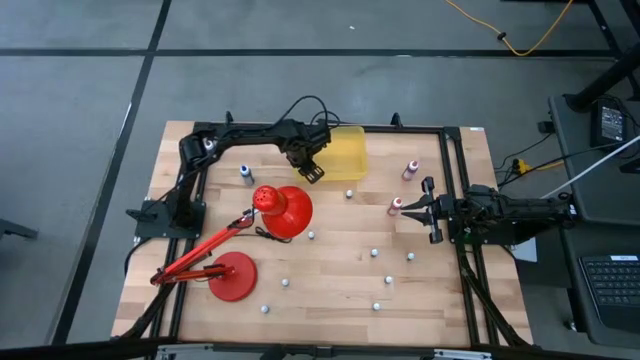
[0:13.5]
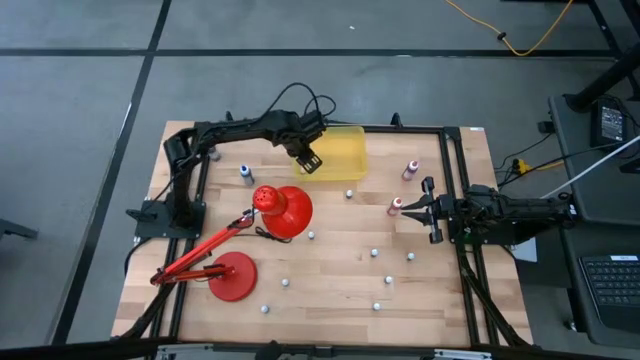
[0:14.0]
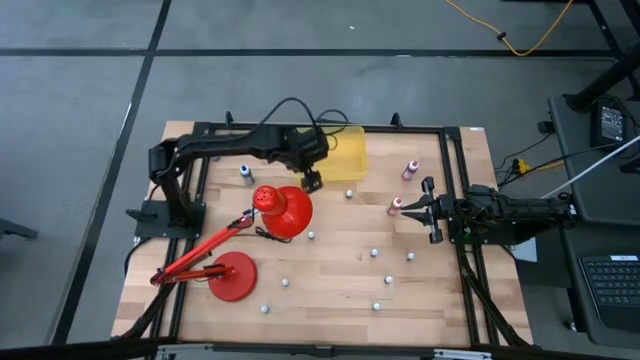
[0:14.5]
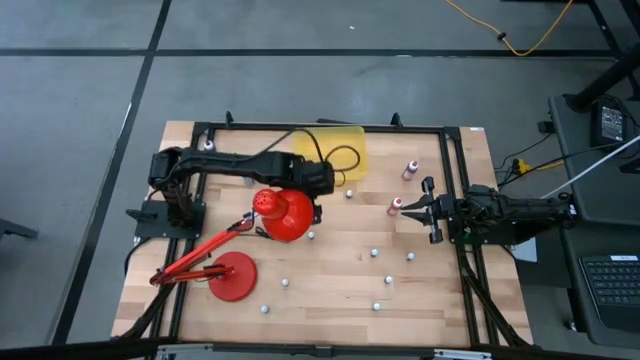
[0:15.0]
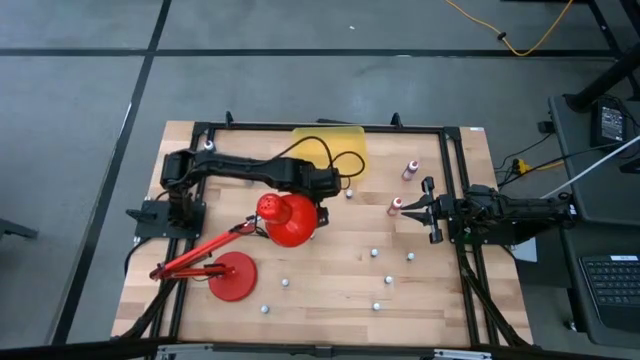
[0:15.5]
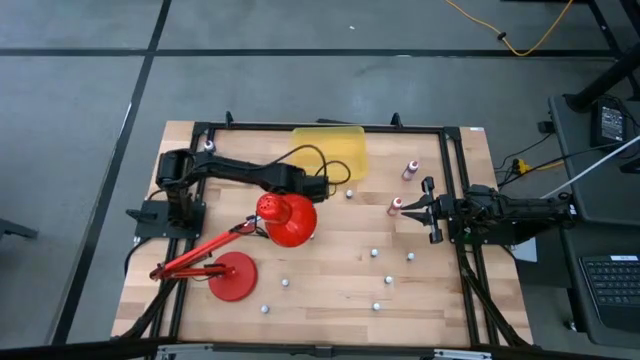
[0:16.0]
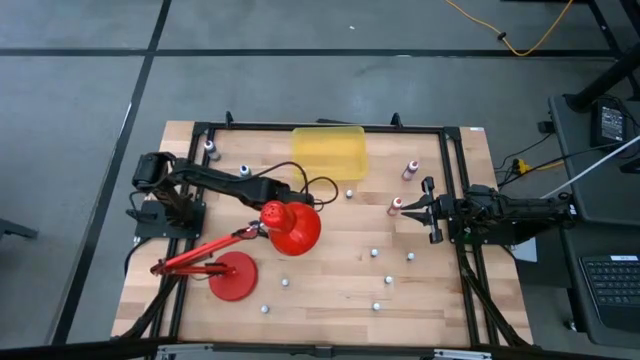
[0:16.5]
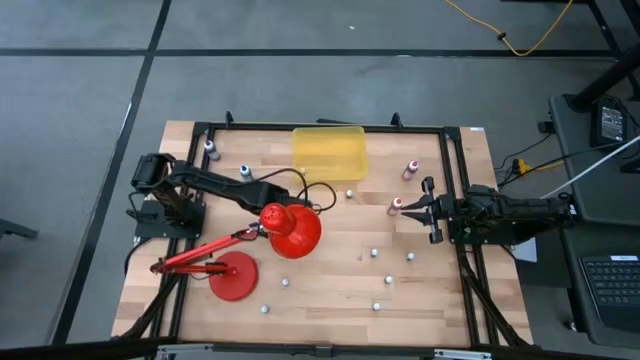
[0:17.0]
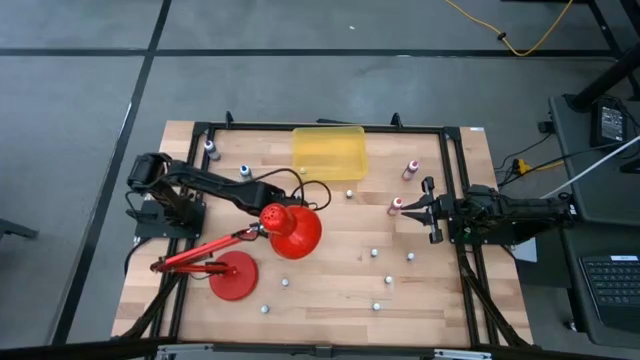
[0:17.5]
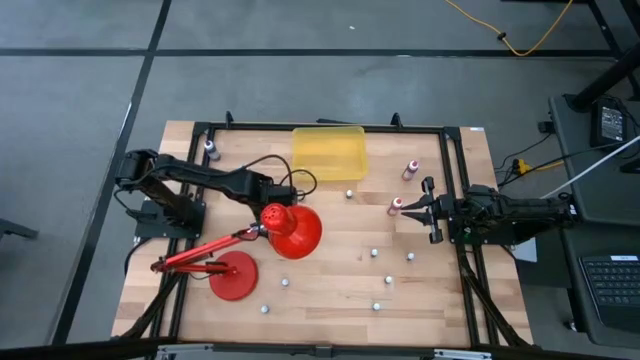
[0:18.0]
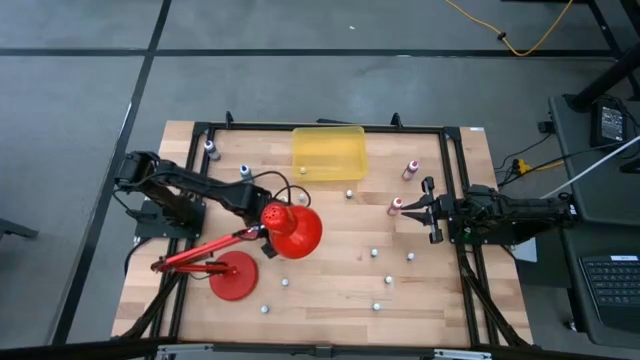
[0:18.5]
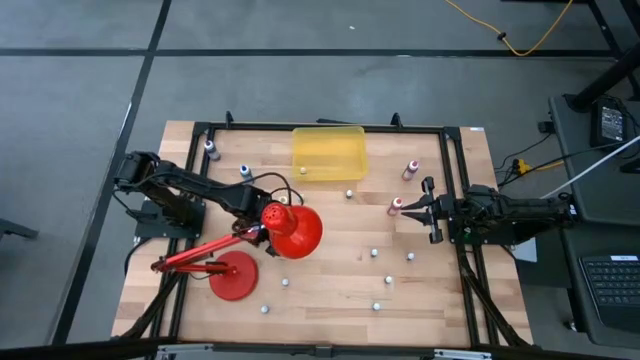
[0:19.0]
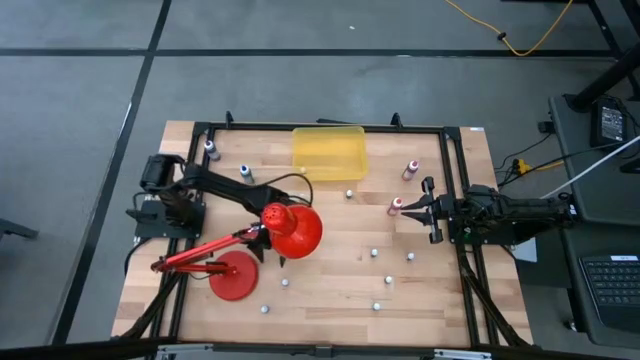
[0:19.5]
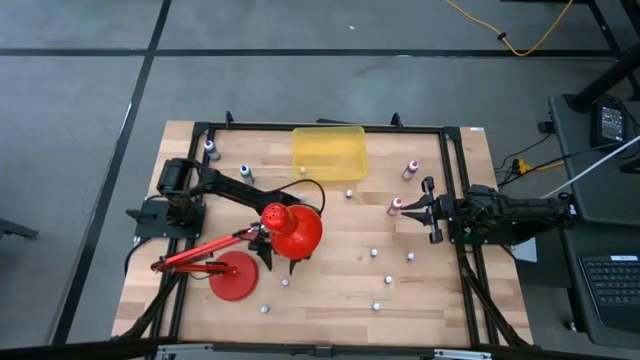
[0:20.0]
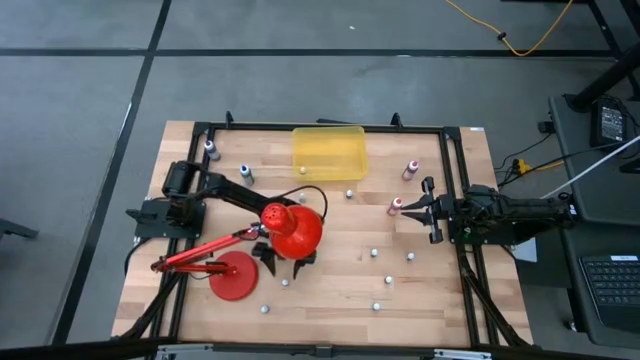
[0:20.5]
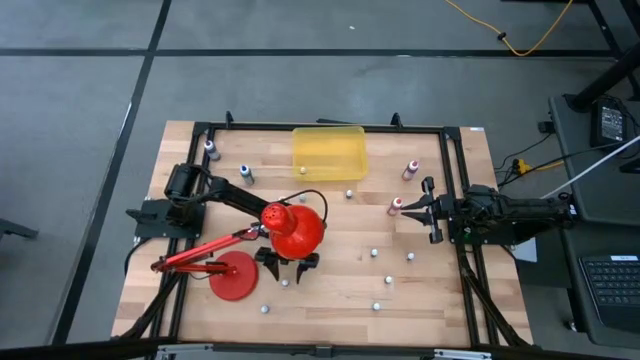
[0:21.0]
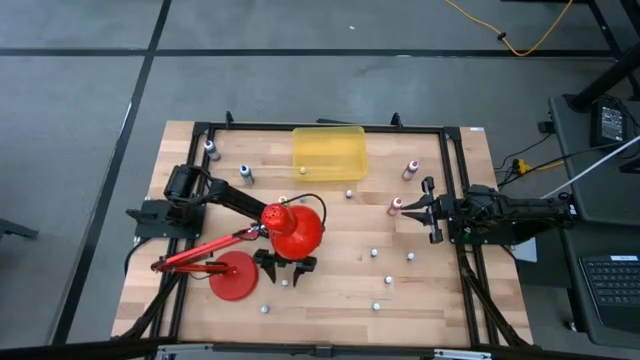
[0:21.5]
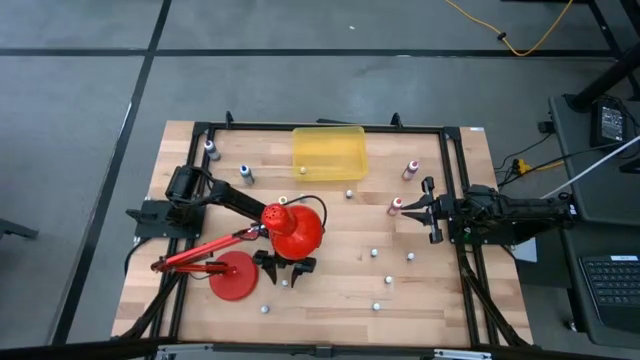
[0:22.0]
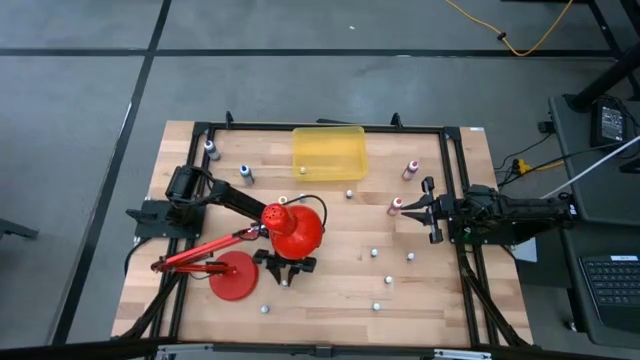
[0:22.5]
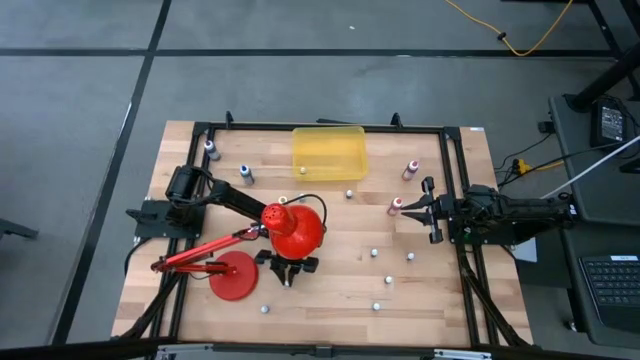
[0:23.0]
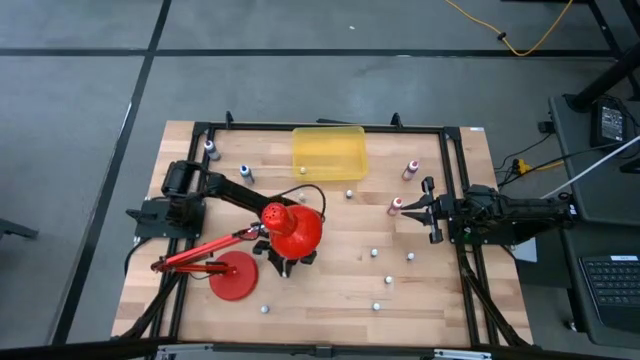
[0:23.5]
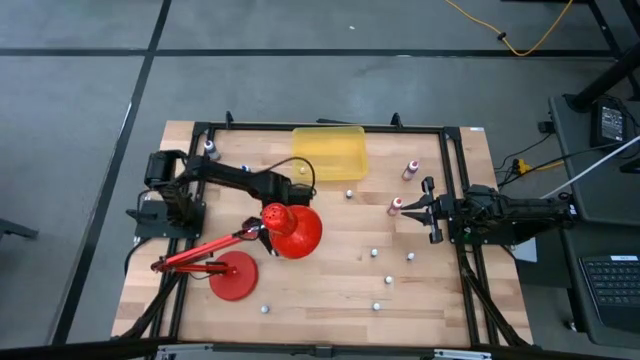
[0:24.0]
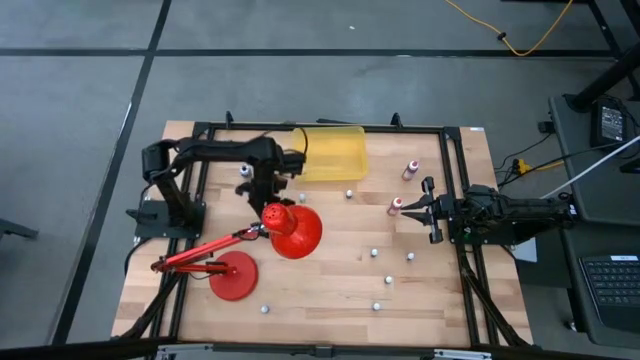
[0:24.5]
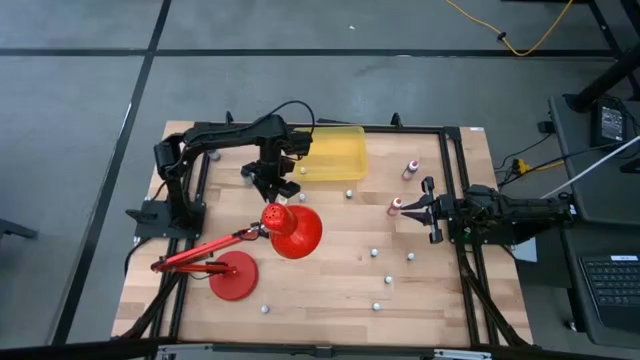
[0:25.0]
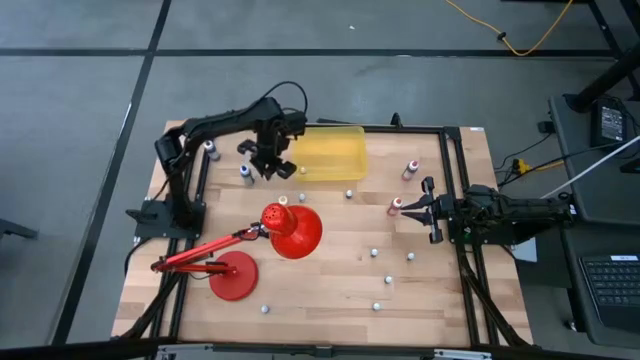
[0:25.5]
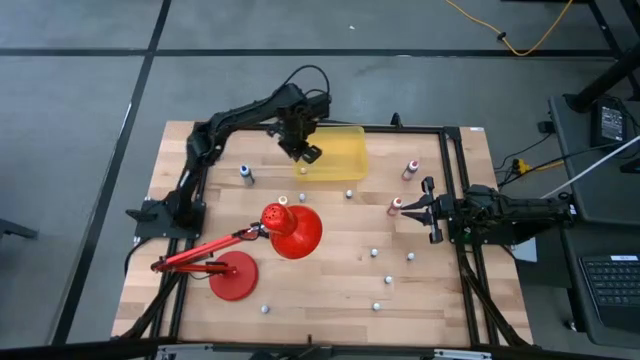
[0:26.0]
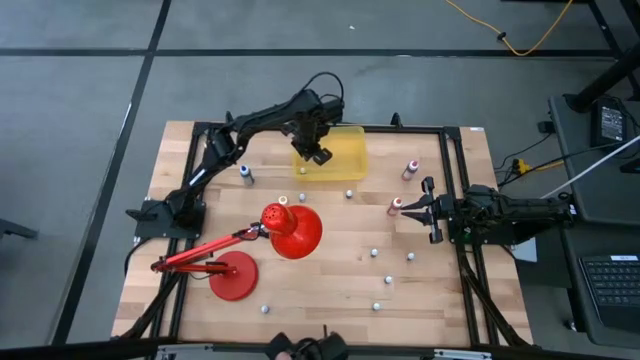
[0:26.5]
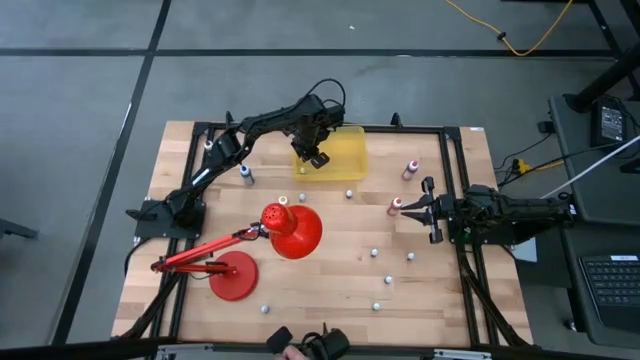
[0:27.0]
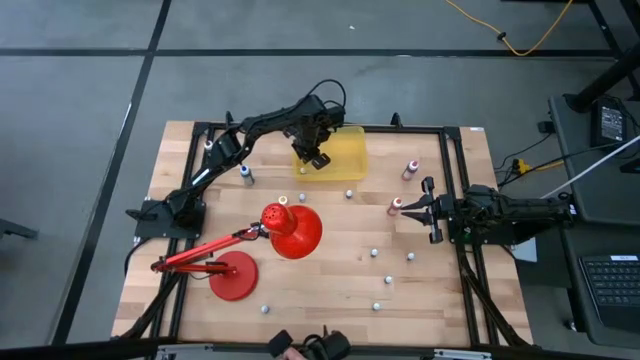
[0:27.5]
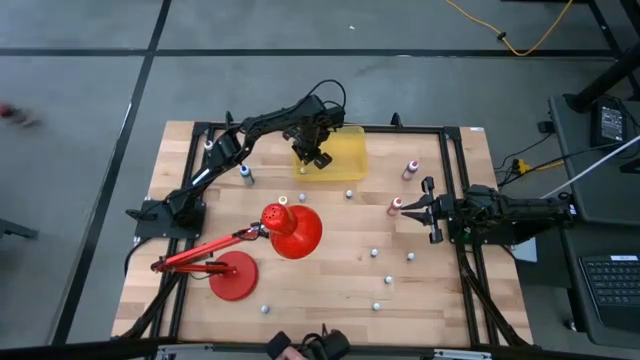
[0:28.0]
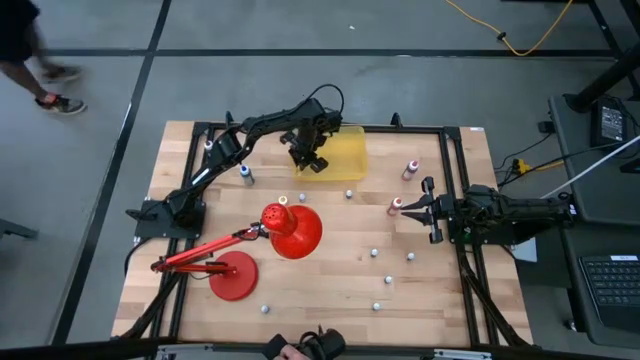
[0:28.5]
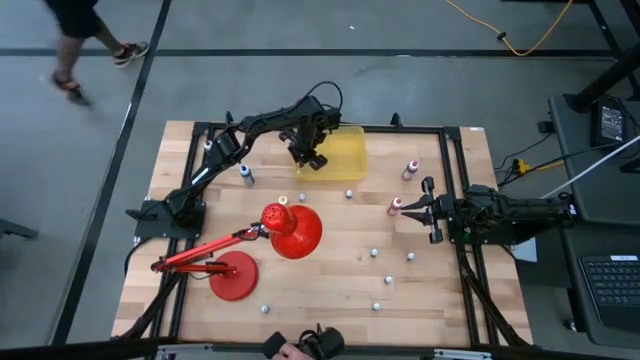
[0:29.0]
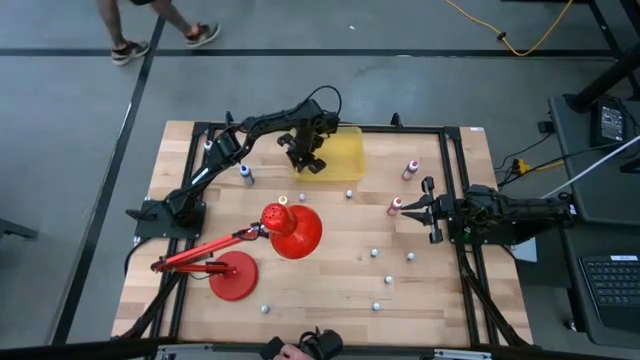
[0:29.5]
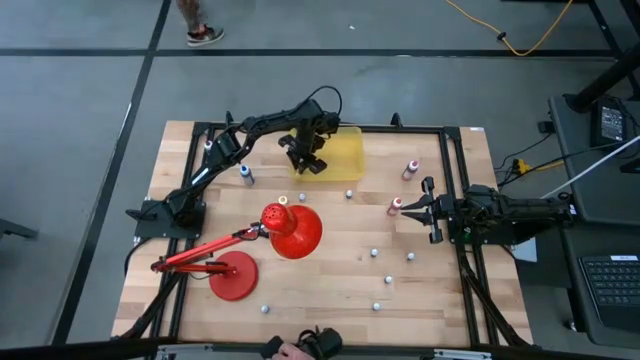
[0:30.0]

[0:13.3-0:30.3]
Task: Pick & Place food coloring
Put the purple food coloring bottle into the yellow bin
